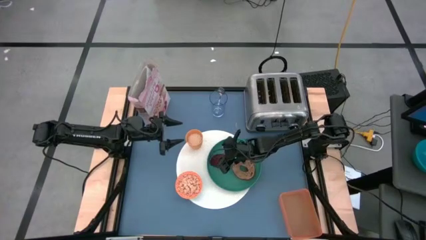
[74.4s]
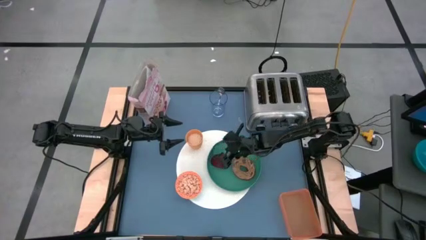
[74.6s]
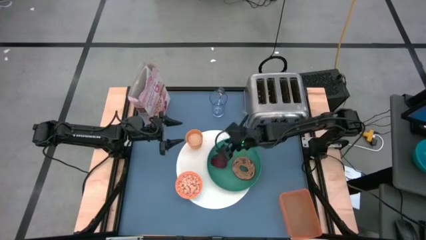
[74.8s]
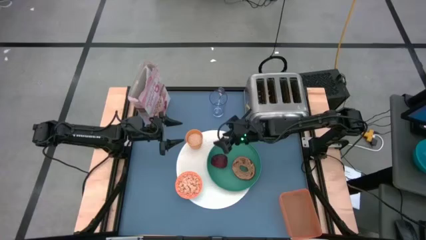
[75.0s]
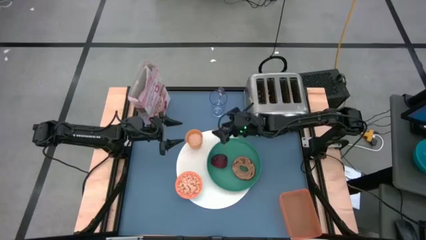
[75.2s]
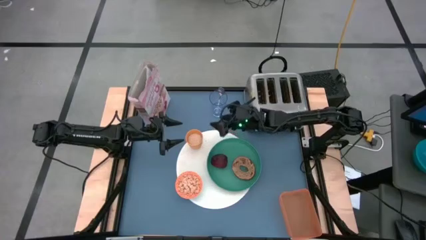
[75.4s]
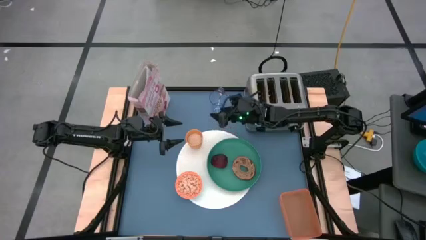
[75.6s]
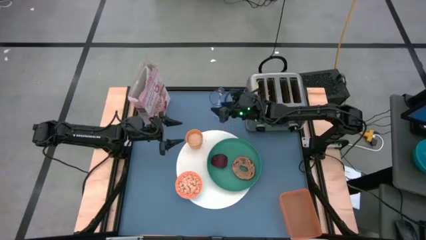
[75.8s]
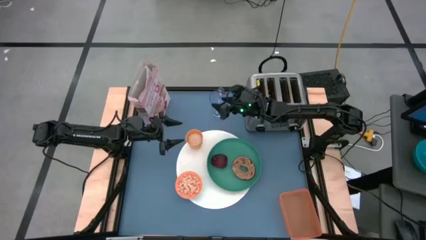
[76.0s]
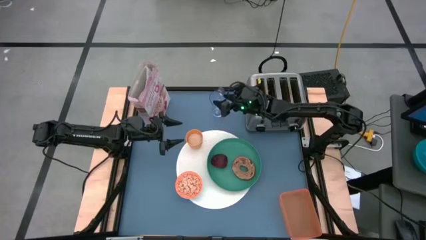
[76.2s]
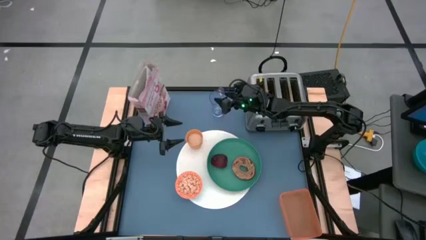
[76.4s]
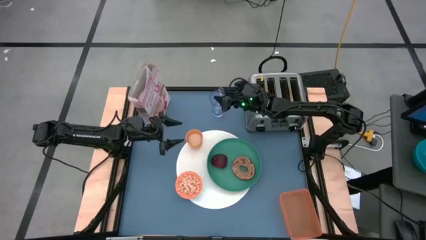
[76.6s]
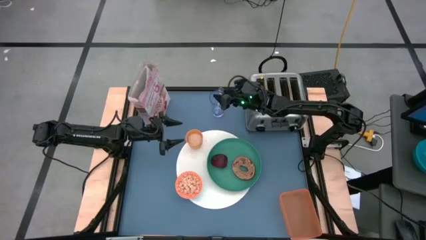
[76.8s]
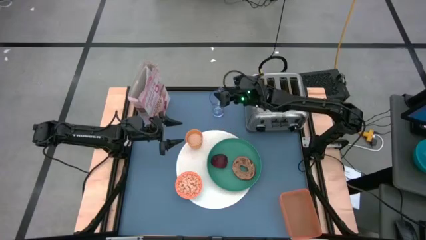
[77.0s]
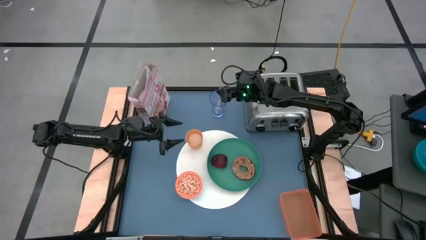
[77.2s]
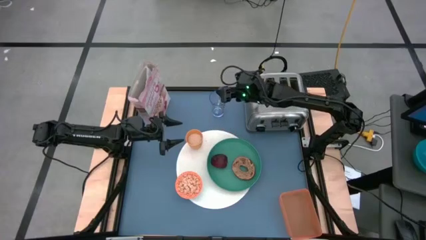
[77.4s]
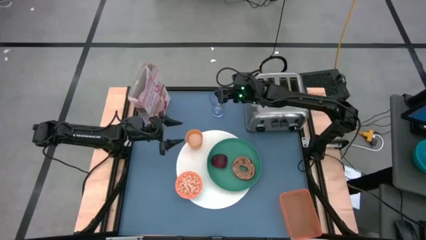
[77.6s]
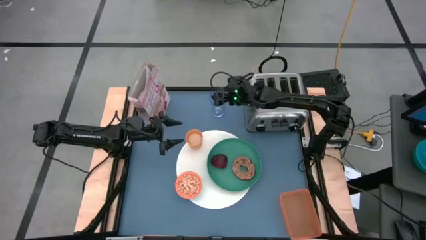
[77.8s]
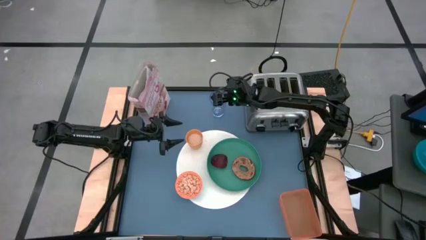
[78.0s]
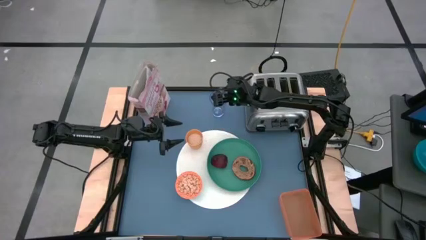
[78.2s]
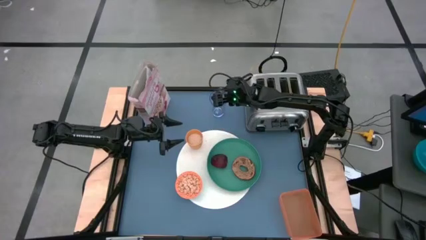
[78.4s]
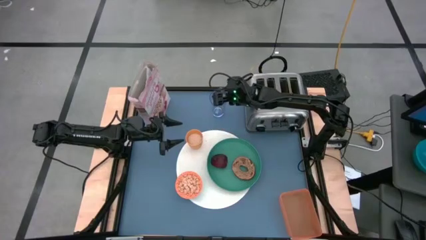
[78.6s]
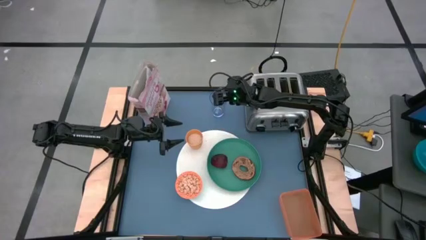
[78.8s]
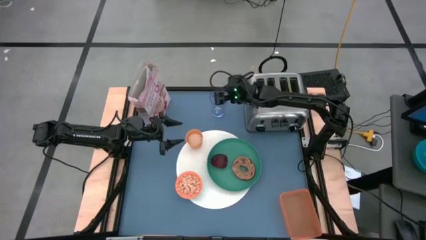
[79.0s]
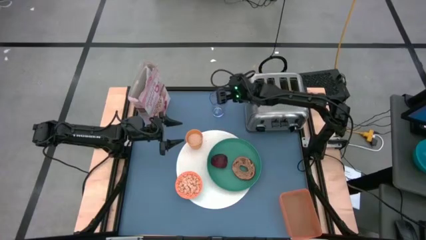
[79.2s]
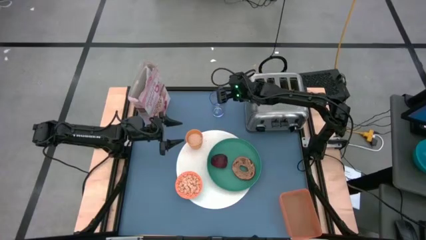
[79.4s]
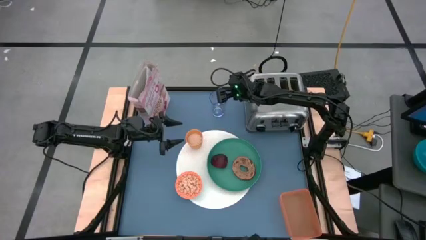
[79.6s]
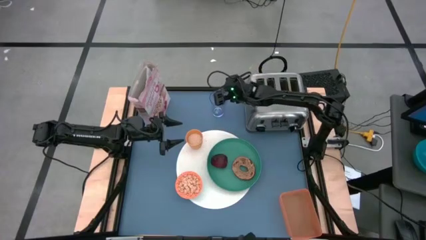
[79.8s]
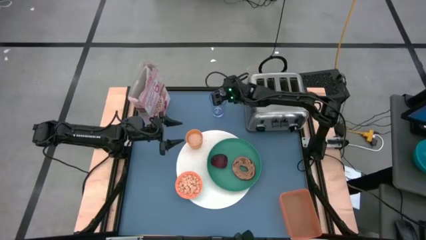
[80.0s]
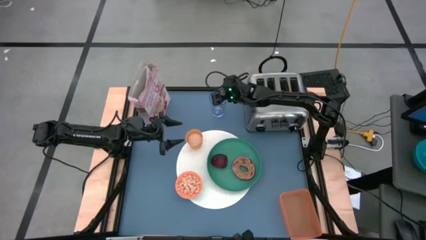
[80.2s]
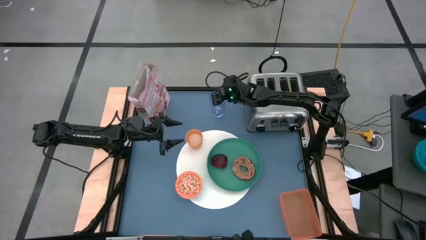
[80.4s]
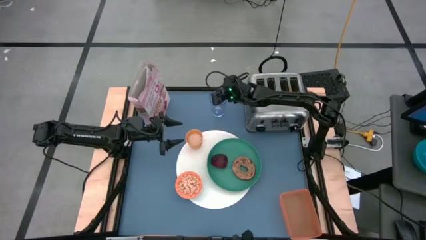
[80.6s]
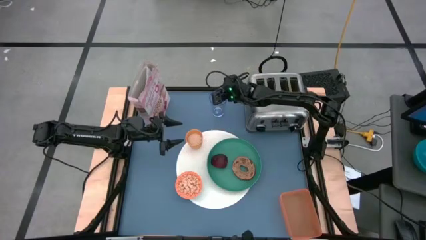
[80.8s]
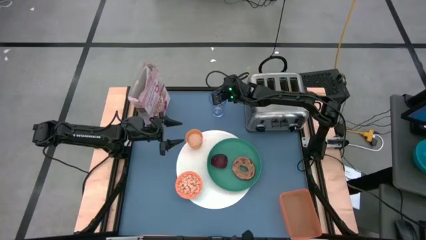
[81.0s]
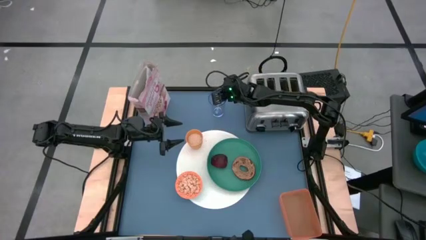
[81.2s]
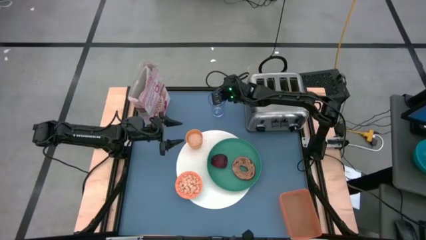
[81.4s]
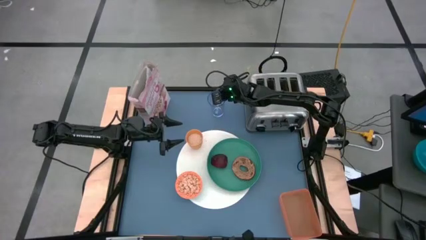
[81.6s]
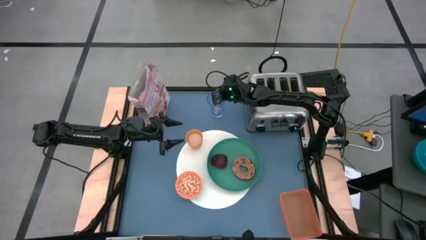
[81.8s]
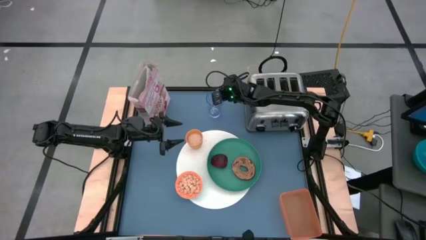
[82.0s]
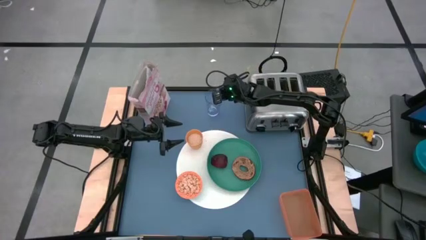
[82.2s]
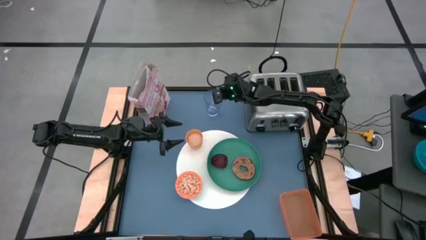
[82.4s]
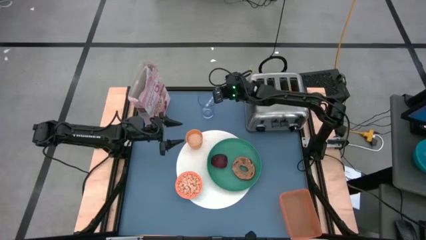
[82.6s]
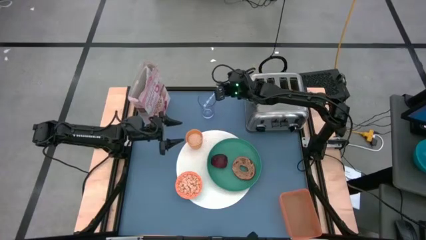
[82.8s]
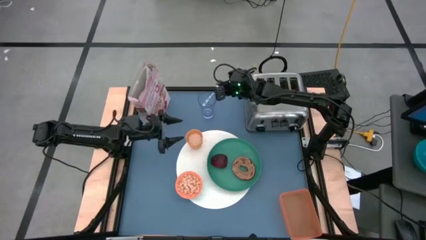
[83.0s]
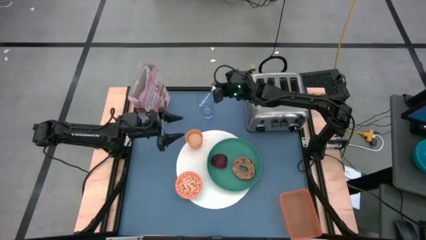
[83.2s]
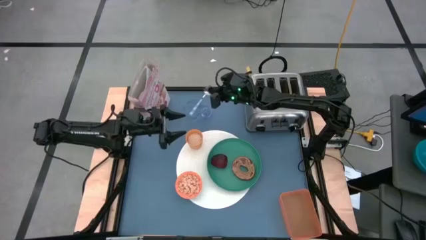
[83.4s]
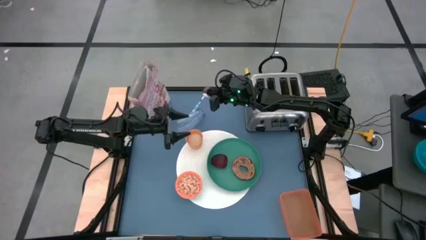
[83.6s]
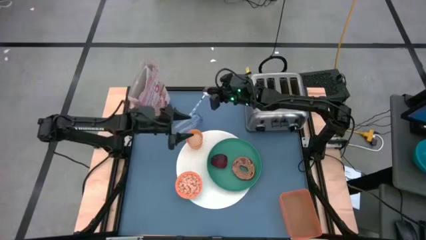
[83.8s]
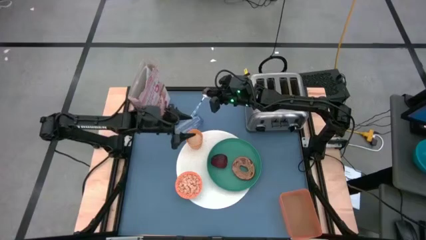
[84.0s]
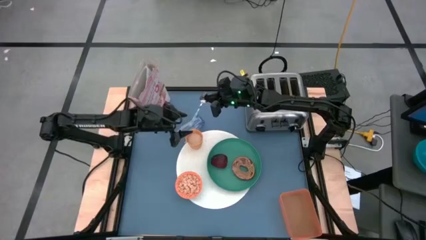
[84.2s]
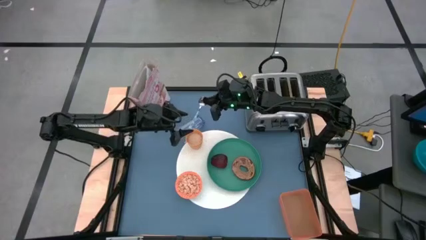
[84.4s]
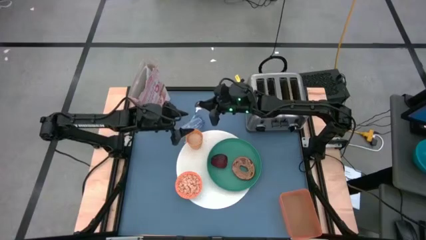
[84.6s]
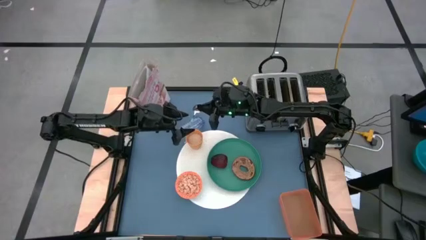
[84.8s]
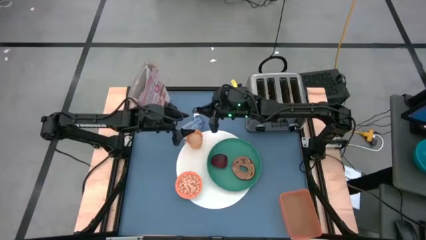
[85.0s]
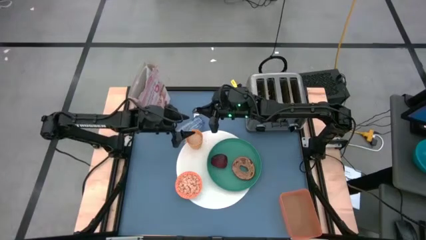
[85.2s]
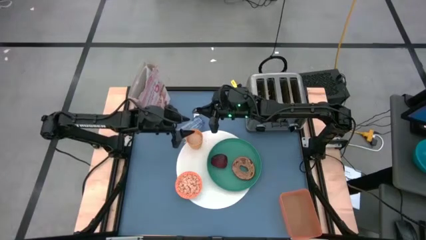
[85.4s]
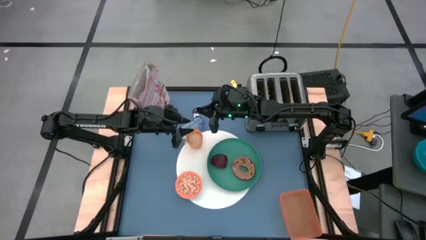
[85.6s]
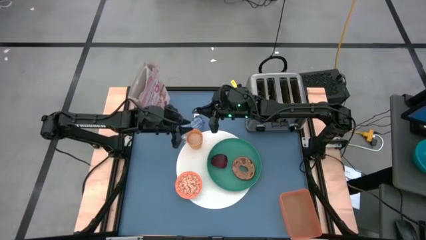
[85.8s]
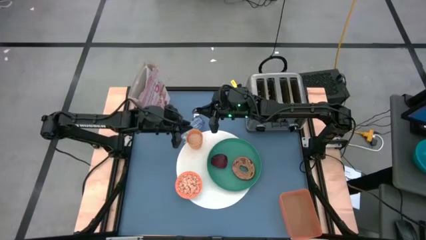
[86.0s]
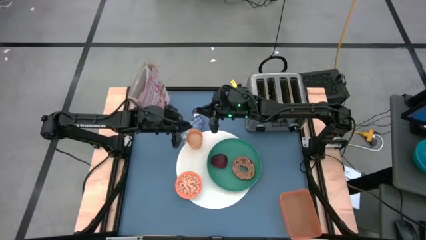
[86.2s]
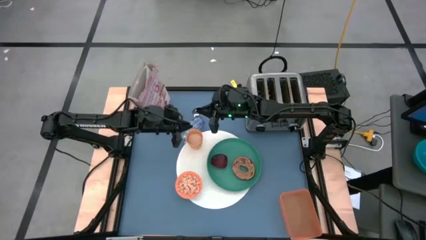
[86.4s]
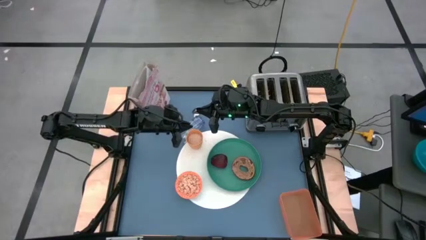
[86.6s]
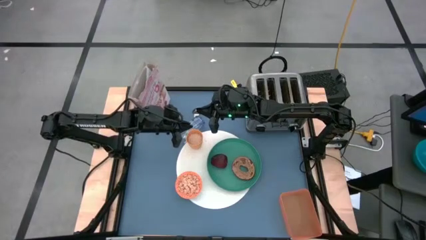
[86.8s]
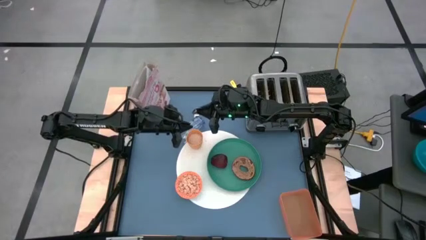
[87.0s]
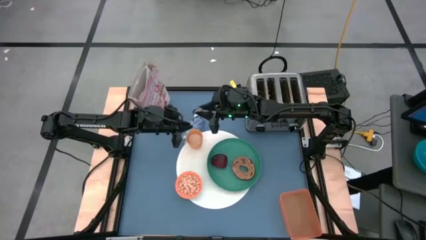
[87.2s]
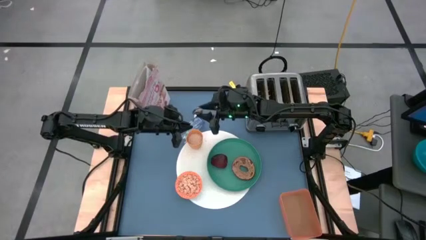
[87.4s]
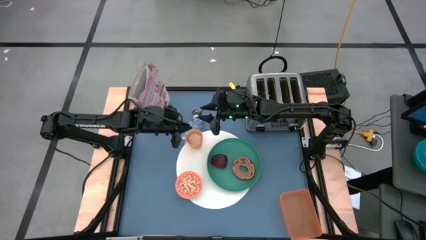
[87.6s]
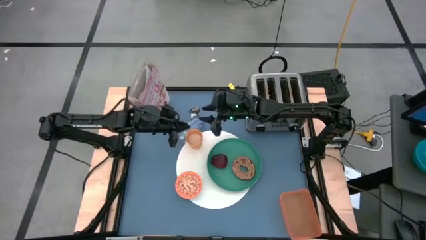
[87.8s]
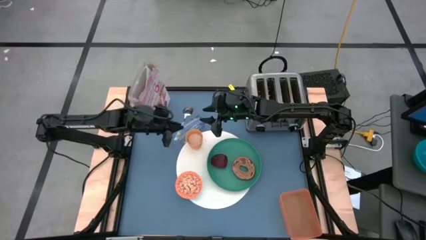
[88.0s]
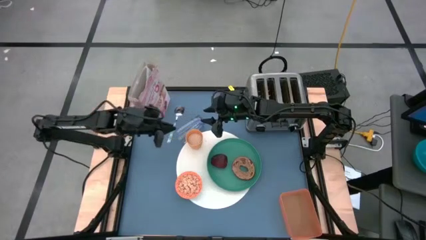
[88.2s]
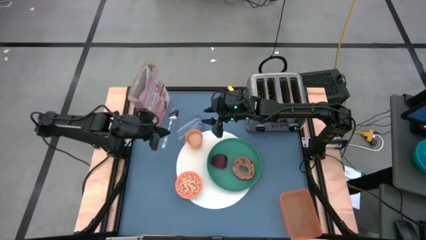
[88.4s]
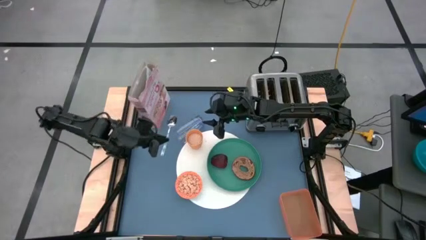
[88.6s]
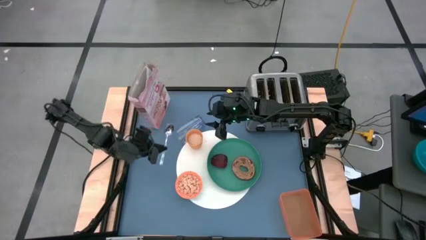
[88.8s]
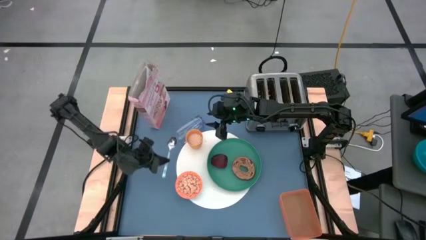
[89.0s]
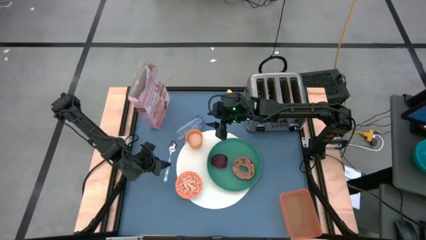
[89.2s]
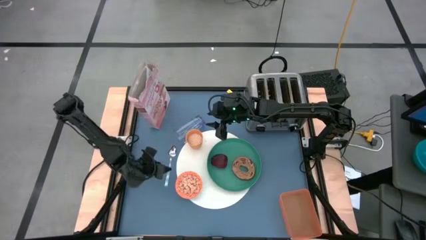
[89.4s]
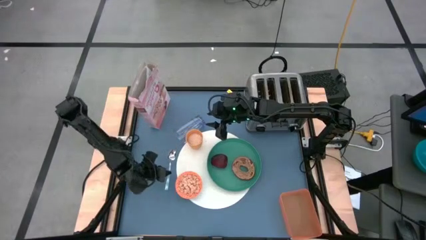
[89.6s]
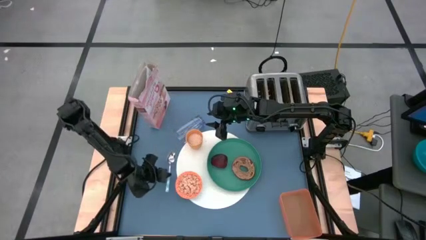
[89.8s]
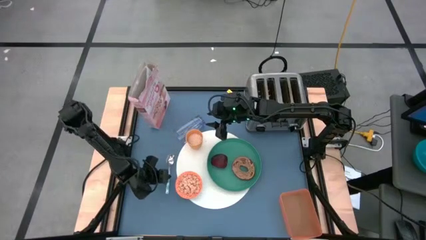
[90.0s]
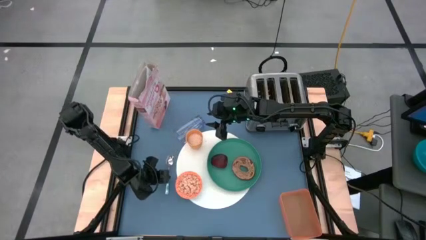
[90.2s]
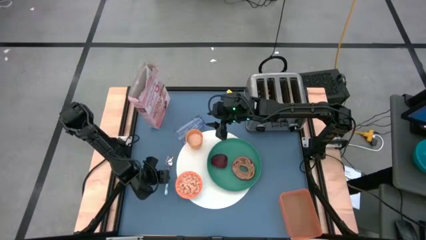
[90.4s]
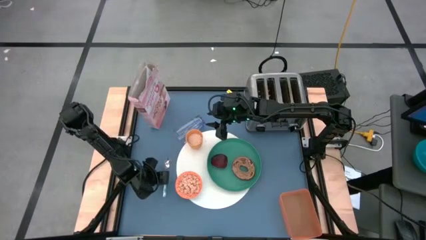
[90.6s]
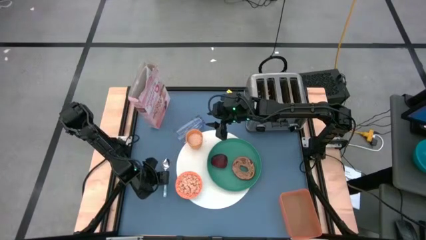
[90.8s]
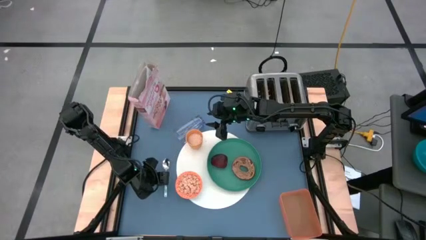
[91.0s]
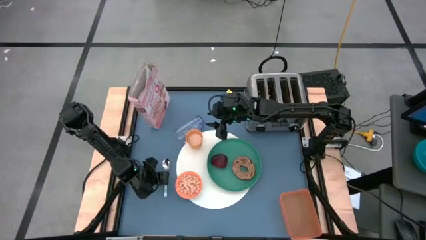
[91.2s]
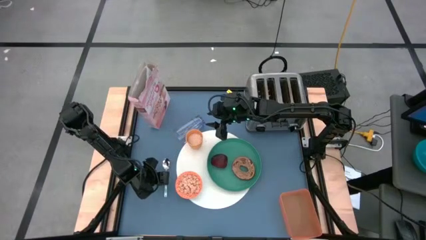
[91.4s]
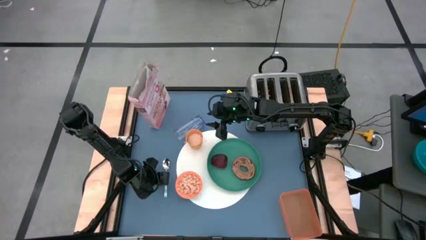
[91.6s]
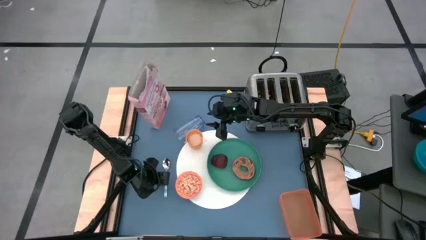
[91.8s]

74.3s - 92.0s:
Task: Arrange a breakfast setting
Put the spoon from the transparent cup to the left side of the white table mat
